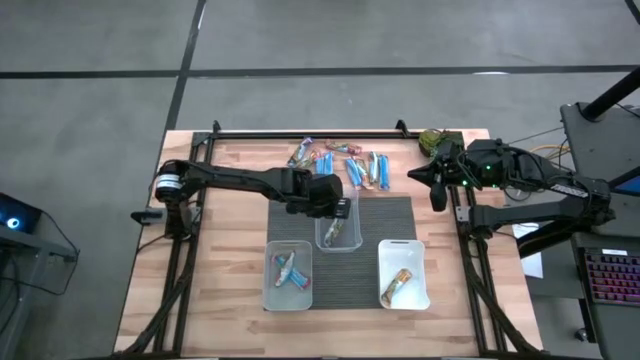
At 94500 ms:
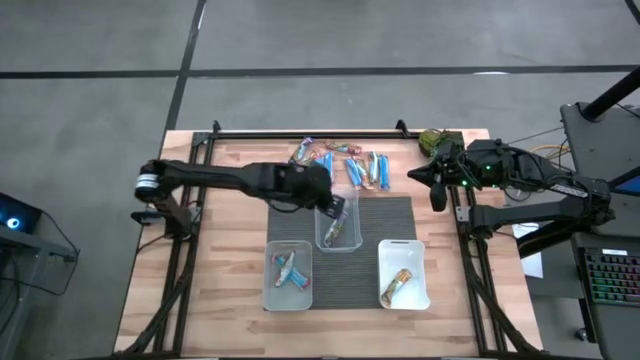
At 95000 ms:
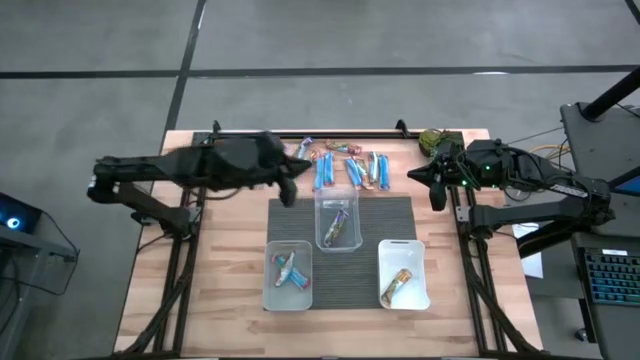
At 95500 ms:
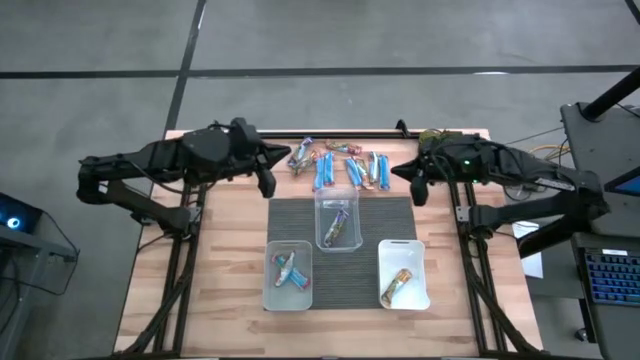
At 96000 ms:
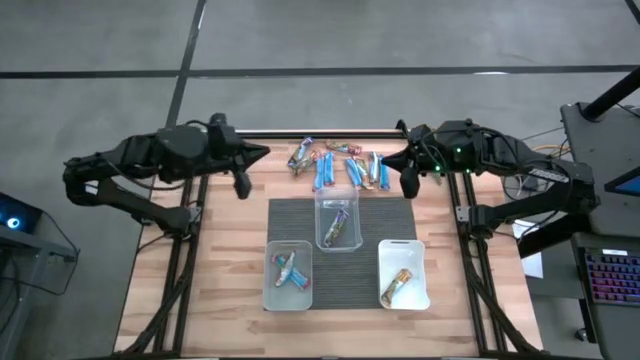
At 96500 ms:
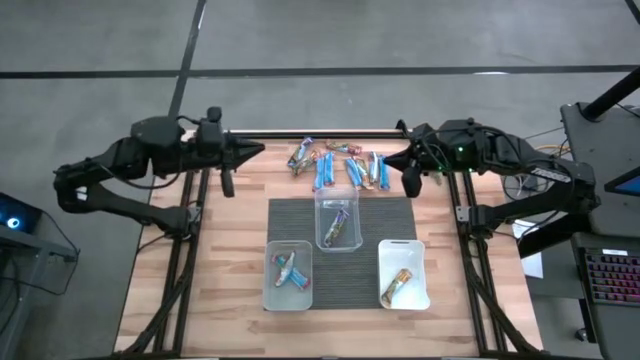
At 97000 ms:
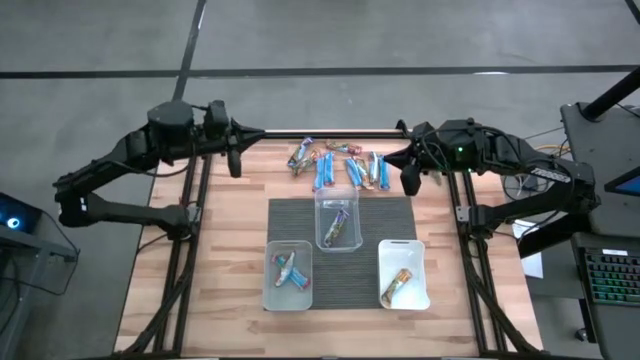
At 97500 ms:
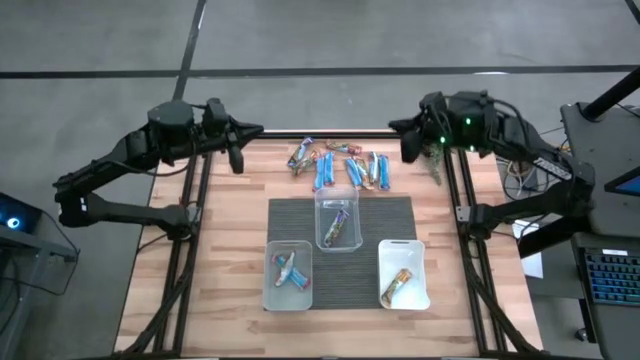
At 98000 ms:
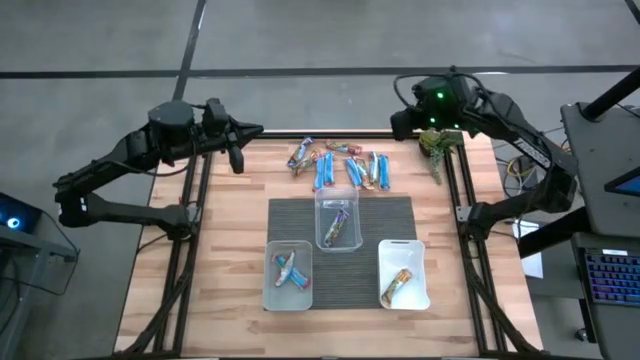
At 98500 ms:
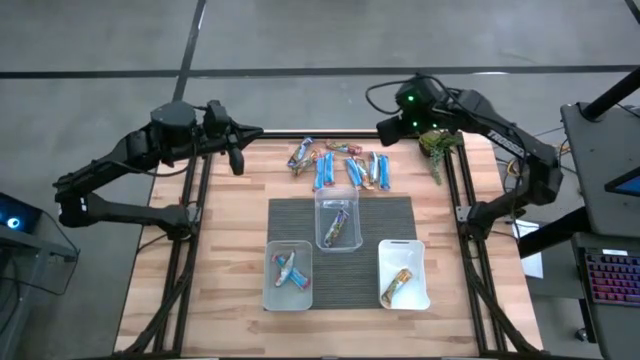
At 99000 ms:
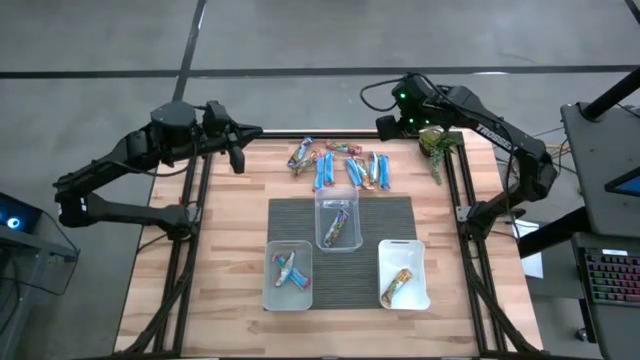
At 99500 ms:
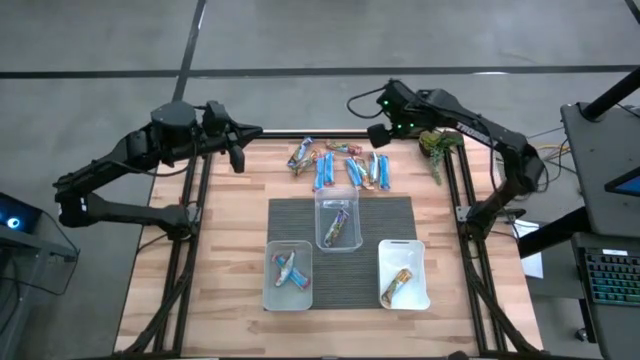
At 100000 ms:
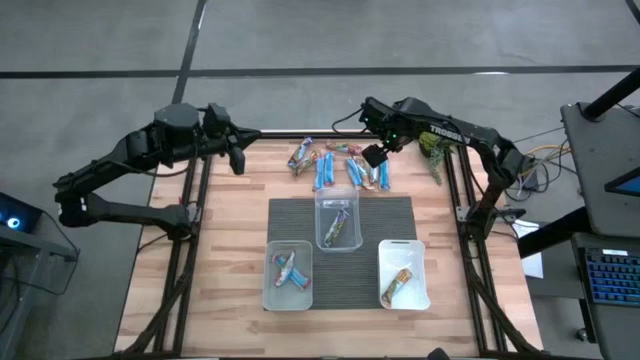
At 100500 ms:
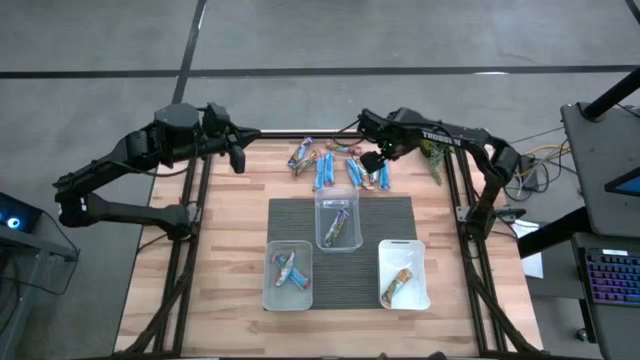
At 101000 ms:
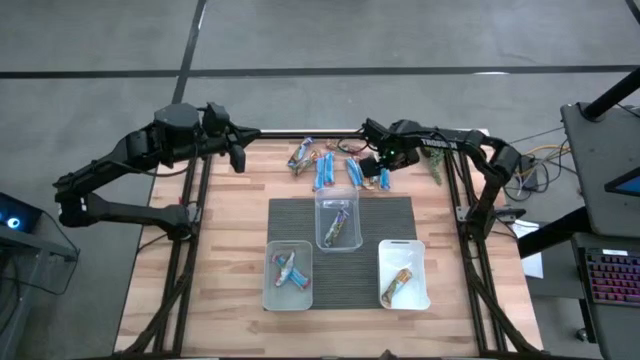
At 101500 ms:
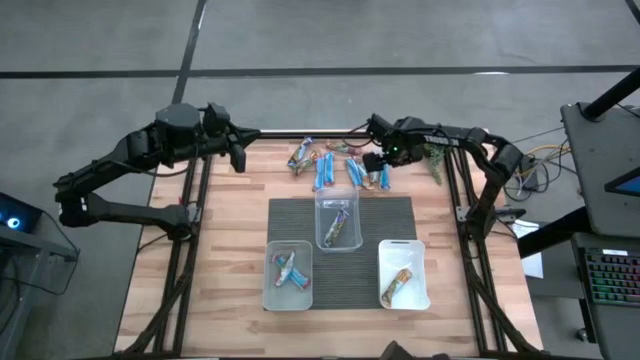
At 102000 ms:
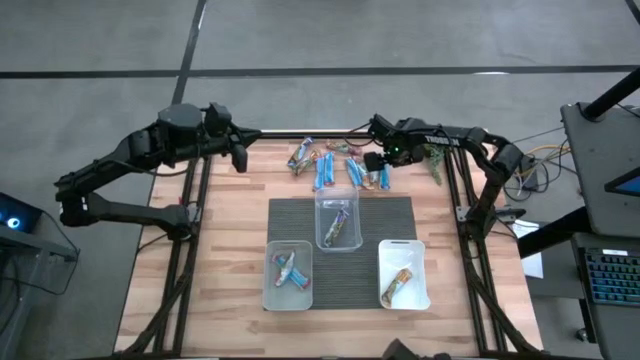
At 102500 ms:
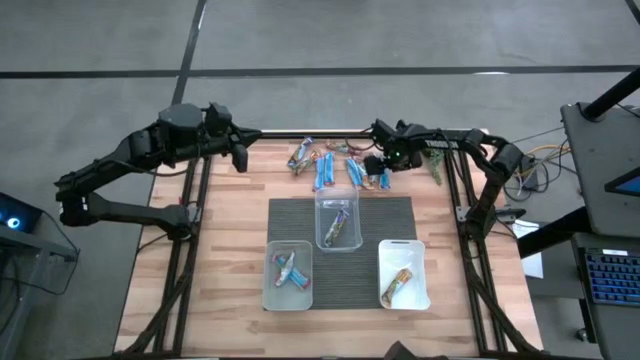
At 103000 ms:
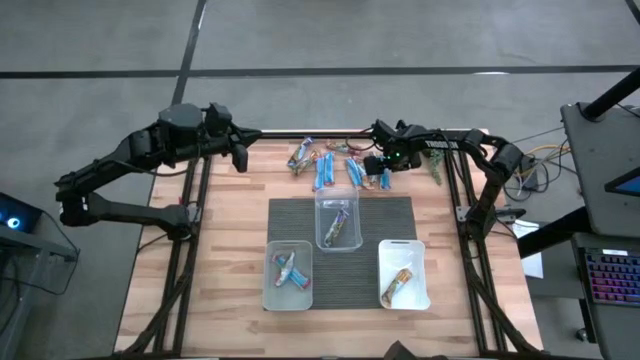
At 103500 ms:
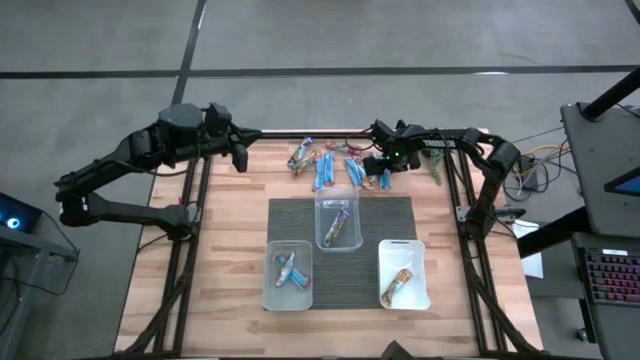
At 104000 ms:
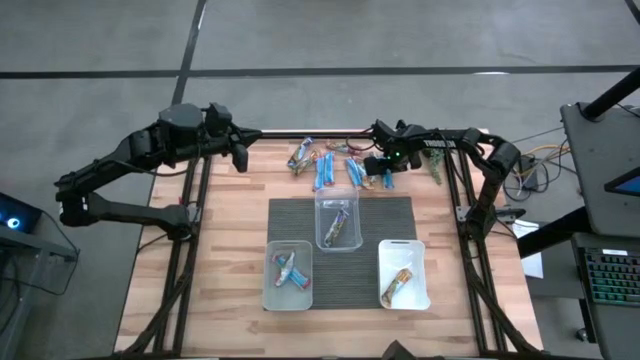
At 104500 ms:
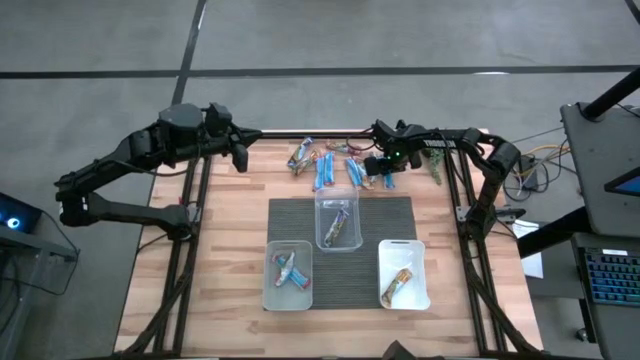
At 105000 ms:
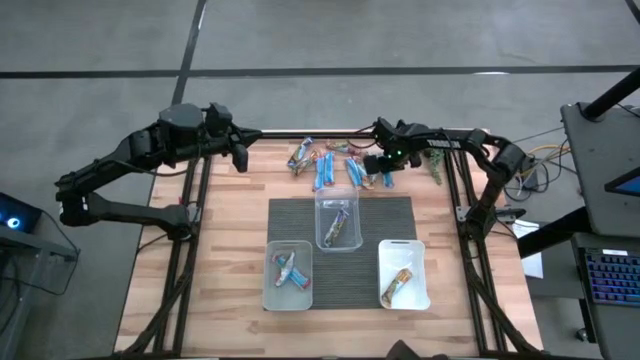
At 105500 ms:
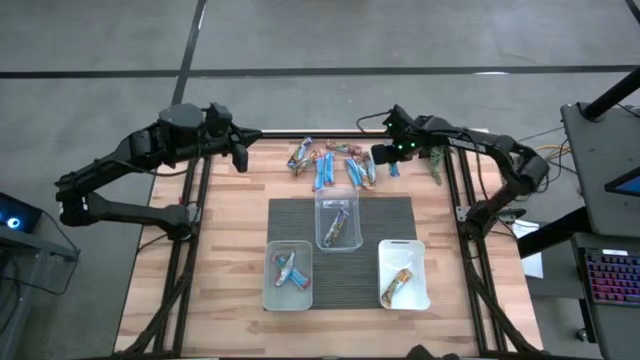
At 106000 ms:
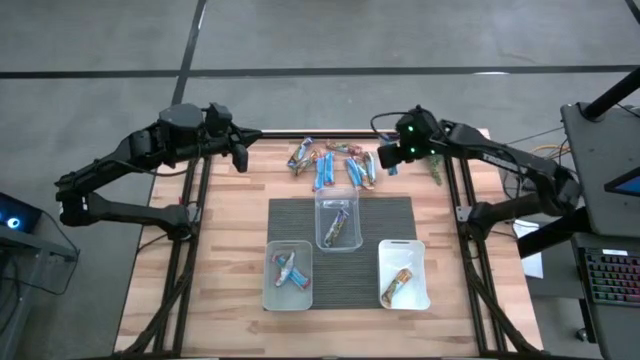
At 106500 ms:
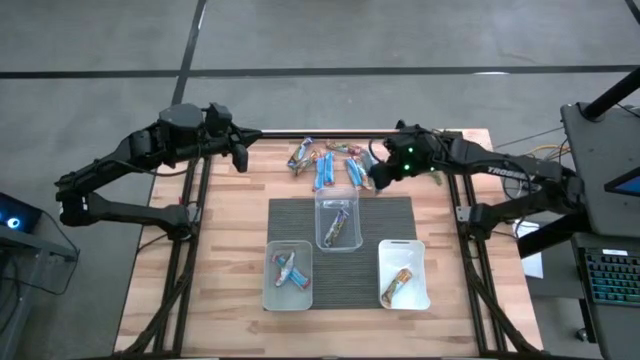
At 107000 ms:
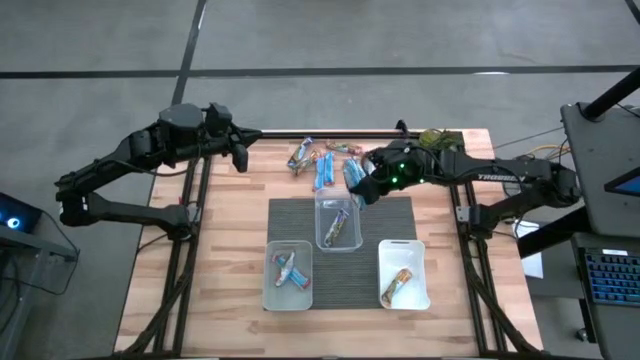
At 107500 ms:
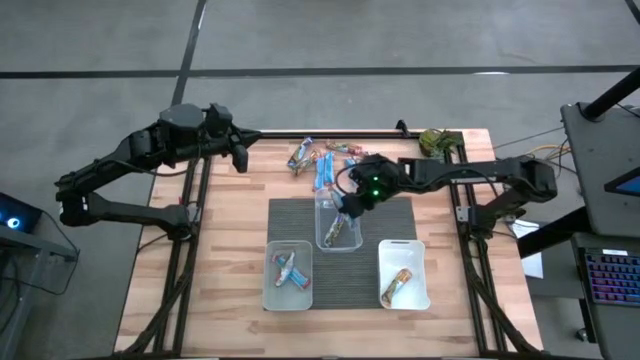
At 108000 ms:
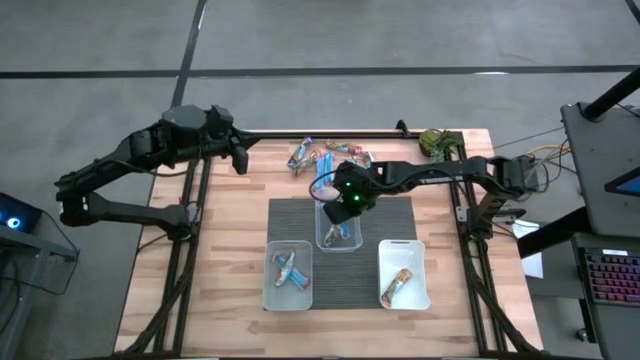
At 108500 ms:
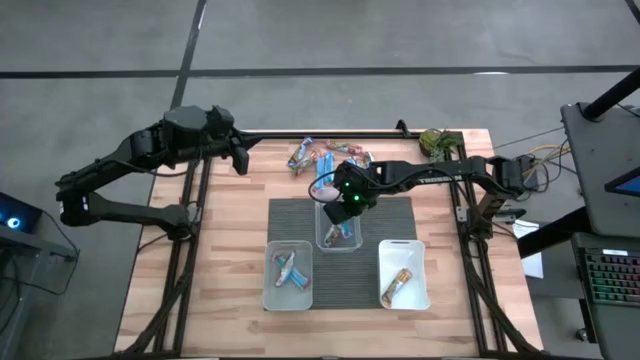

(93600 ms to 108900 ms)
Task: Pick and place Granola Bars by type
Put the blue granola bar into the transparent bin

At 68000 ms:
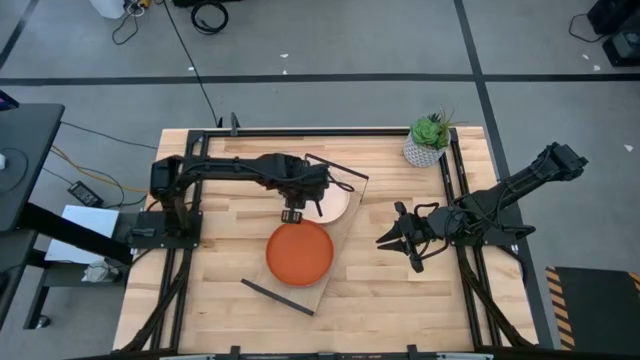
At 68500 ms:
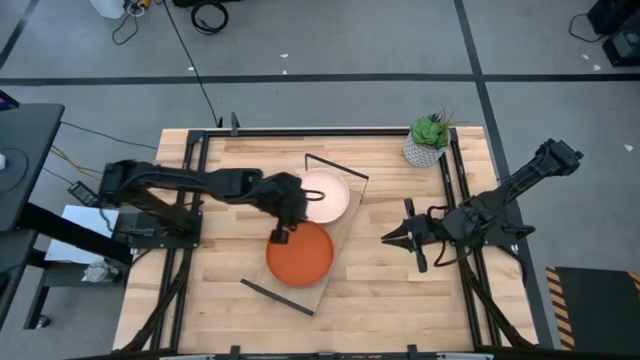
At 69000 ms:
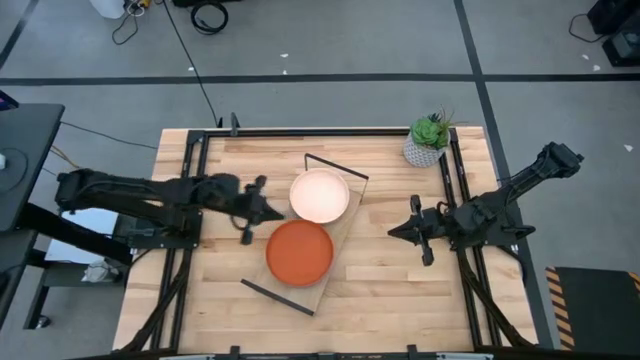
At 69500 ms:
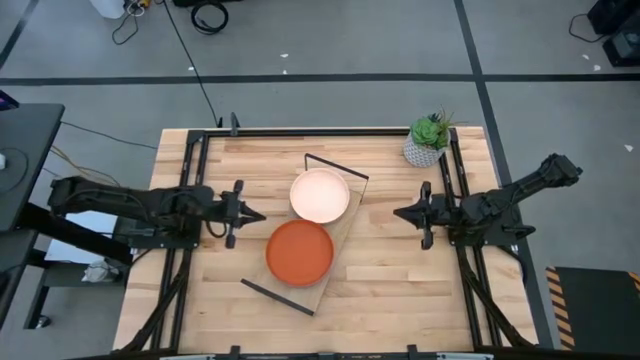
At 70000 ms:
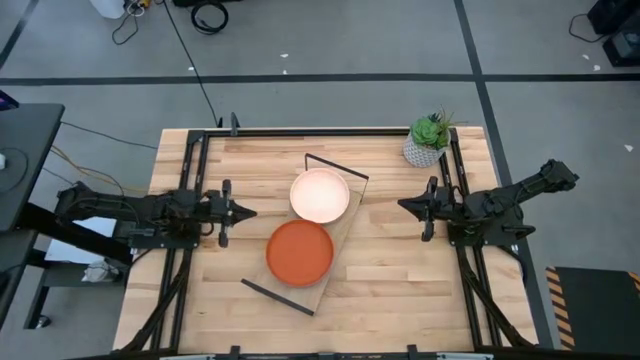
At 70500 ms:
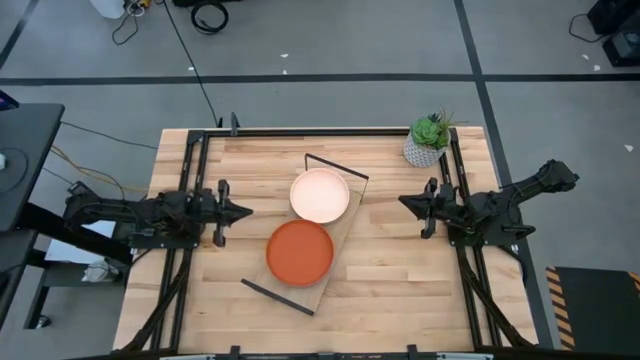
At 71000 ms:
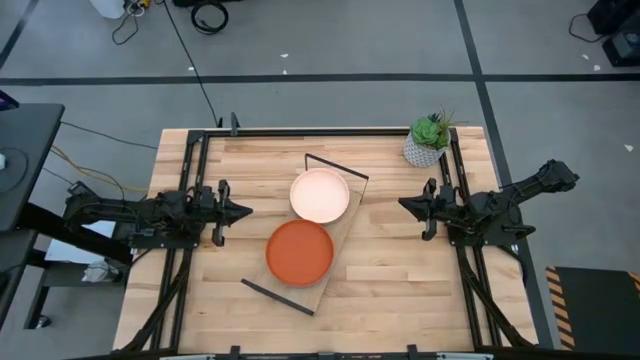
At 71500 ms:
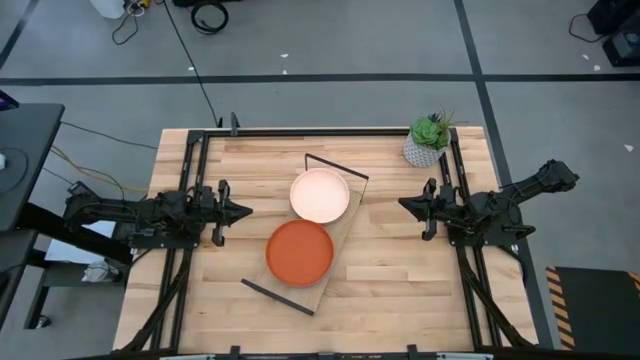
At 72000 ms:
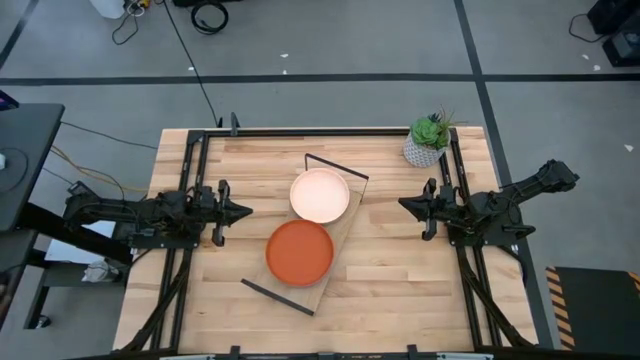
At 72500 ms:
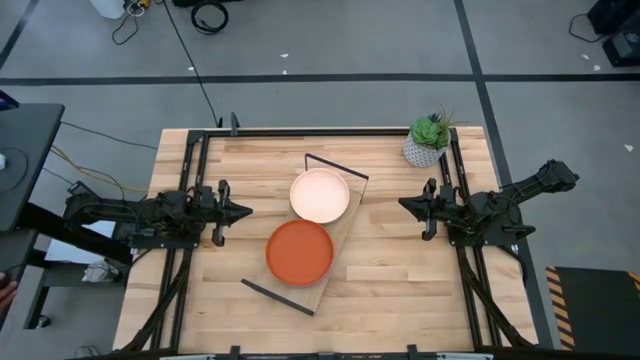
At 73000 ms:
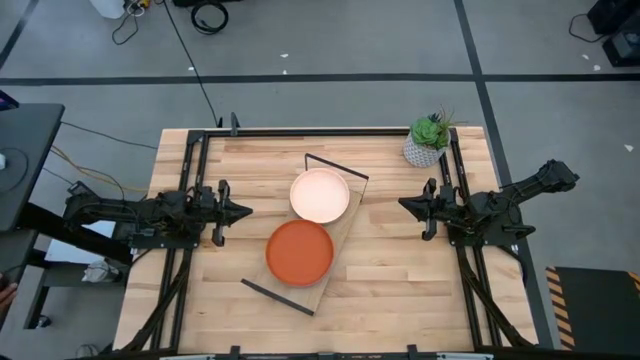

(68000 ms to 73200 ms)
Task: Place and stack plates onto a shelf
Return to Home Position

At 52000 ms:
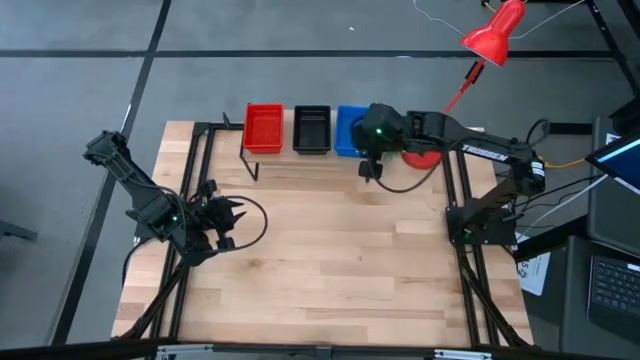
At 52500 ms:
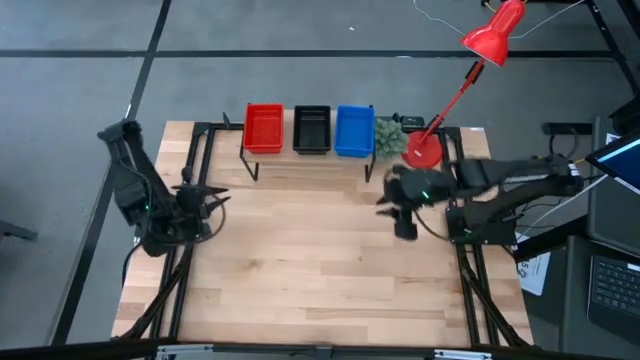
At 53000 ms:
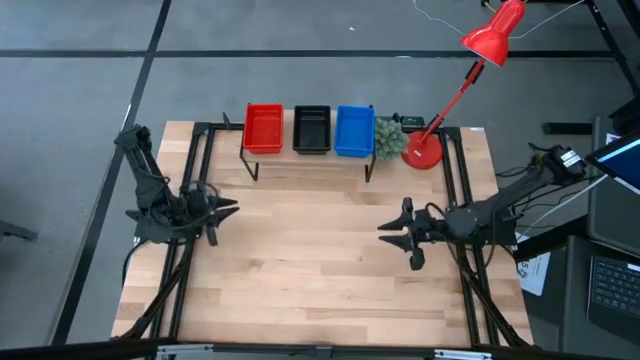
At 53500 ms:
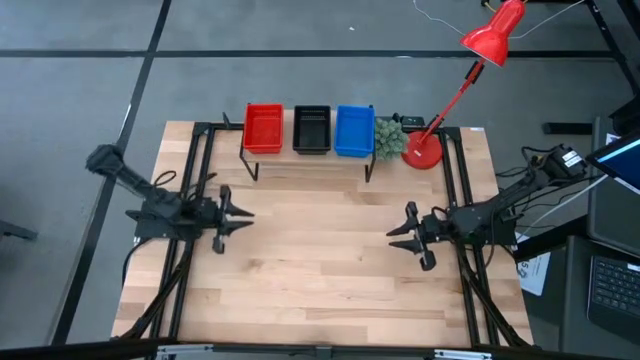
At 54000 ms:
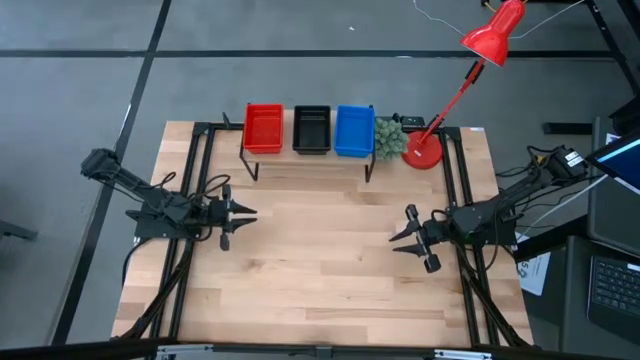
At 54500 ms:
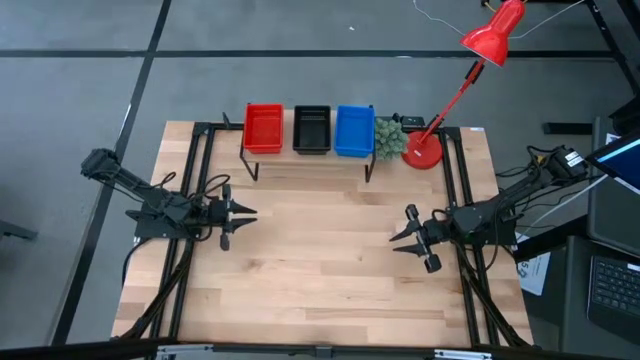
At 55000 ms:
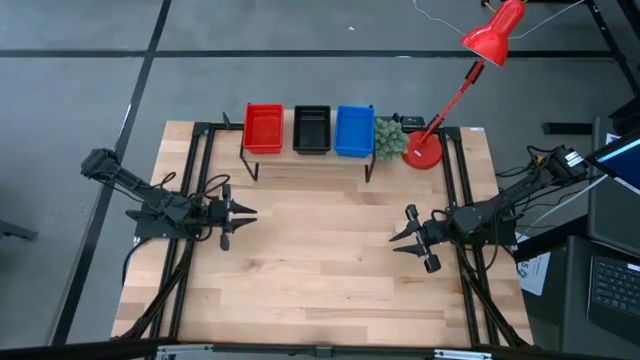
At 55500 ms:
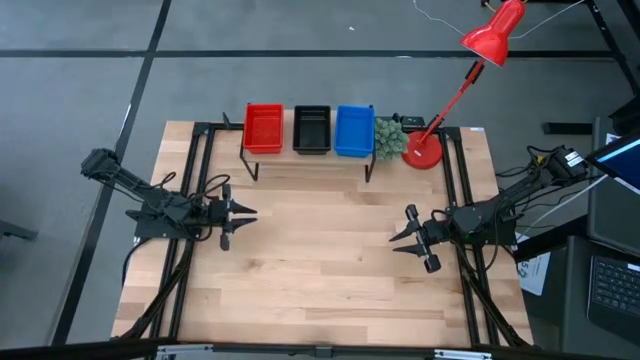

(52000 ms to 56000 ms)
Task: Stack baskets on shelf by color
Return to Home Position
